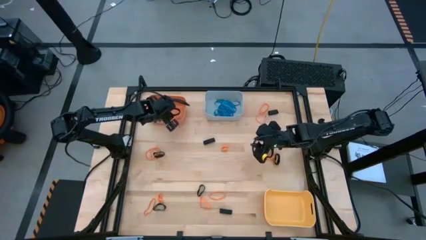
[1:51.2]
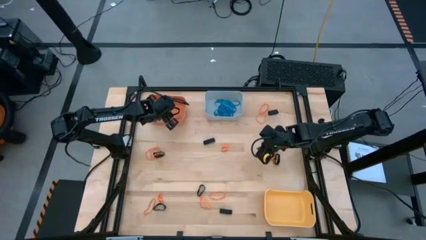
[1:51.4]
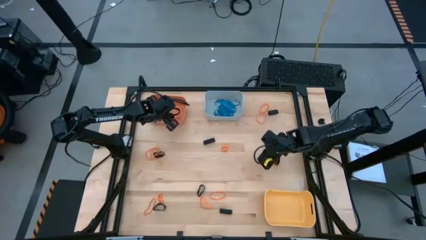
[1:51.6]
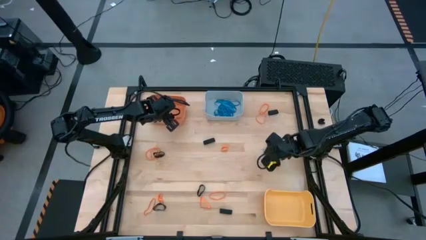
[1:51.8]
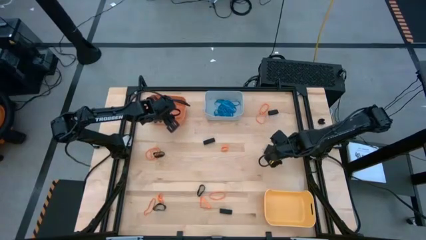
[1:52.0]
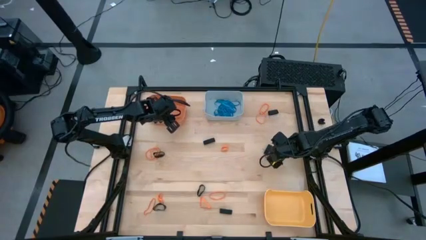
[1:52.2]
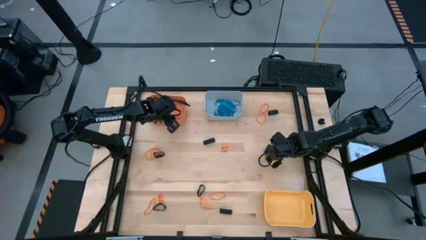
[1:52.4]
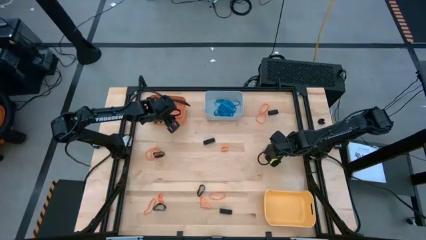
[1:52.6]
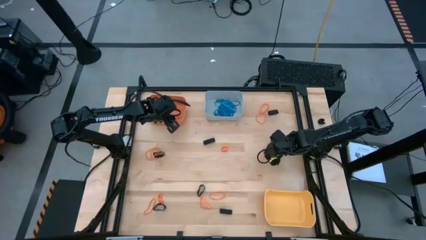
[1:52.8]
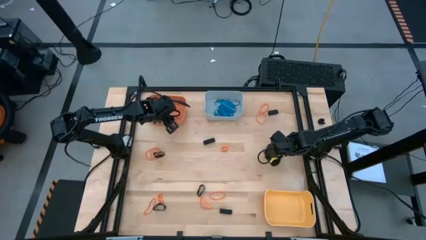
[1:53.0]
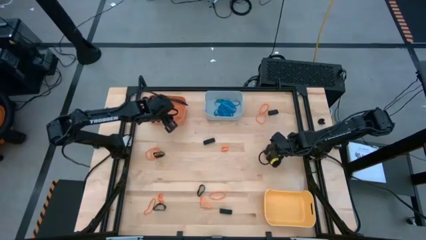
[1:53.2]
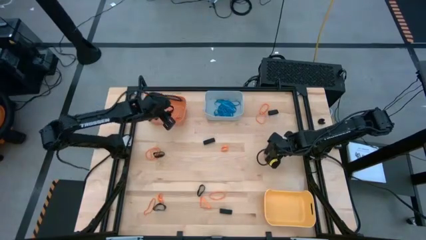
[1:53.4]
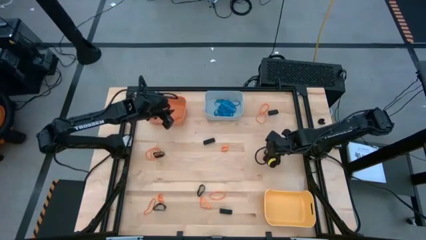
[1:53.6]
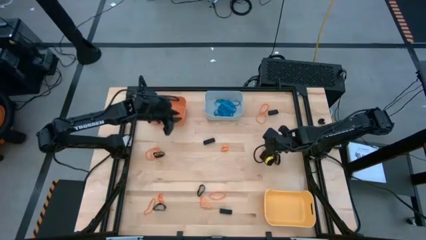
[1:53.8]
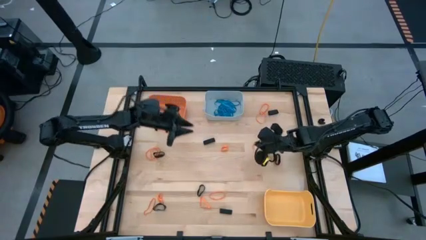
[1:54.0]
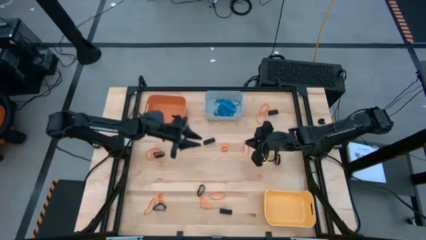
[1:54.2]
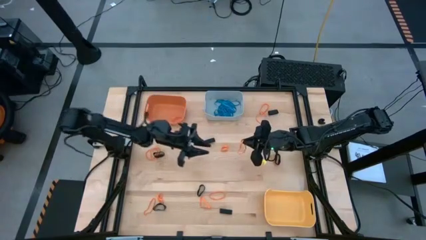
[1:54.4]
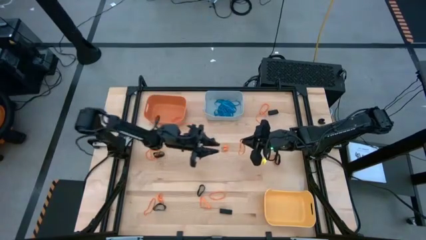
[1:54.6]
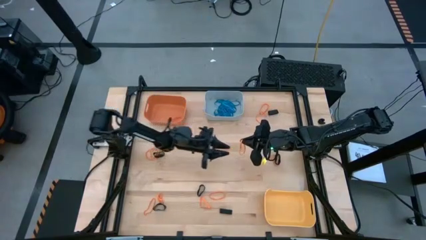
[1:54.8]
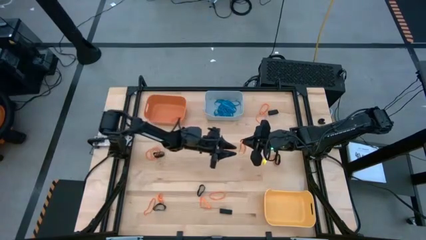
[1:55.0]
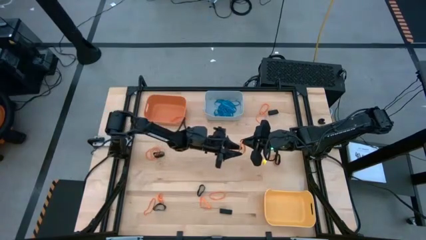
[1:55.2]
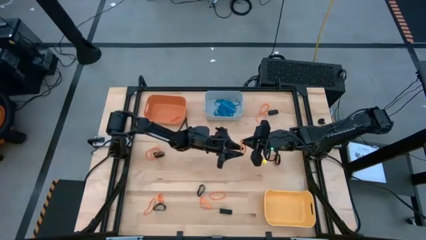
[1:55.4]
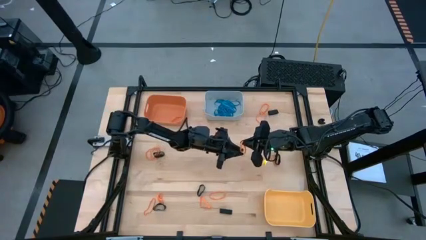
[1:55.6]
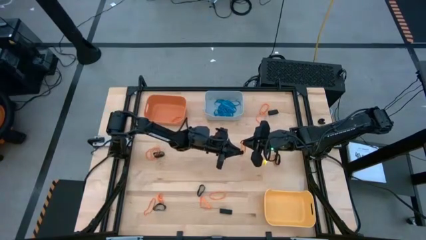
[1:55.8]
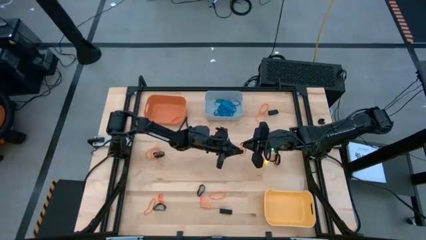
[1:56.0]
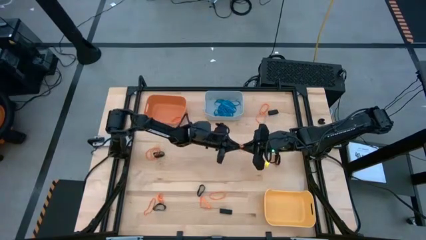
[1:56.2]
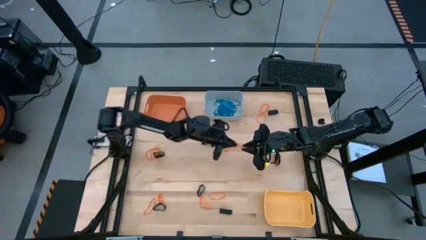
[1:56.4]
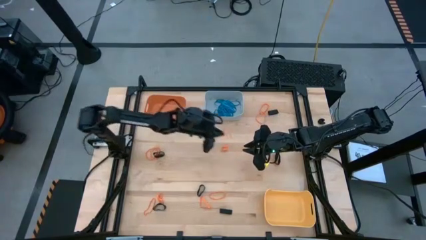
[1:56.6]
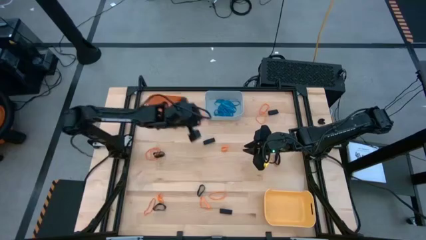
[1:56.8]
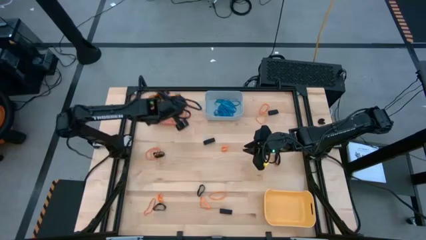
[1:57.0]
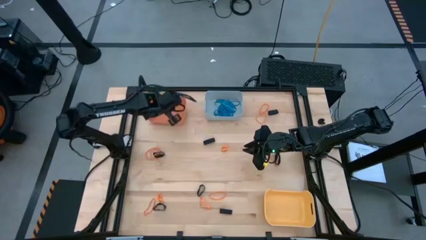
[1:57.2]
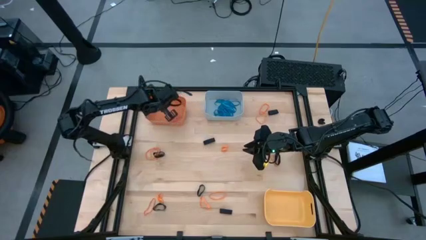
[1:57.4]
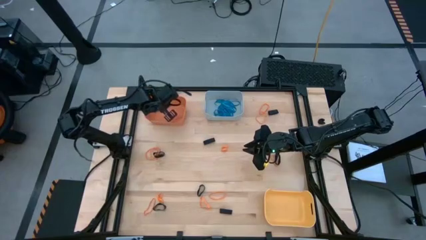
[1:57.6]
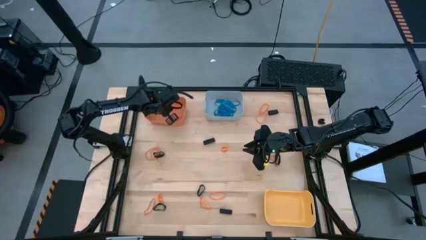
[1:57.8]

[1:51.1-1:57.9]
Task: Sort rubber bands into baskets
Put the orange rubberband into the orange bin

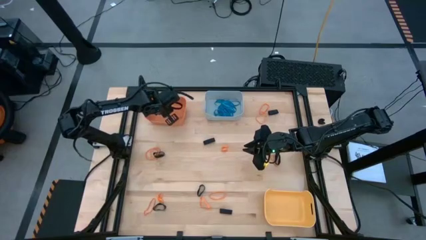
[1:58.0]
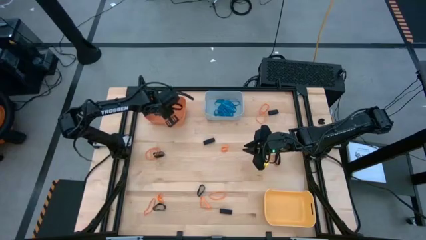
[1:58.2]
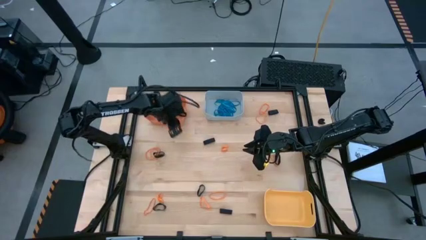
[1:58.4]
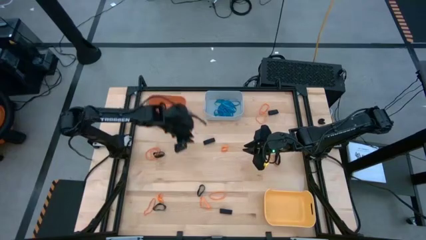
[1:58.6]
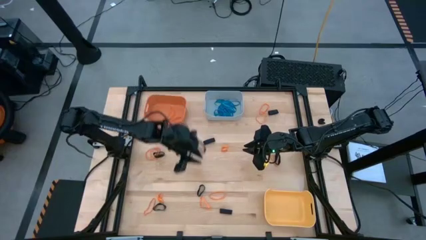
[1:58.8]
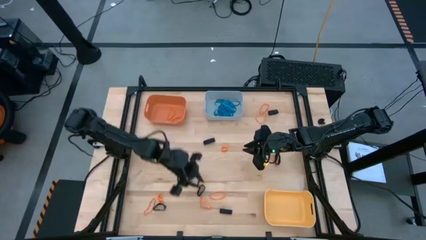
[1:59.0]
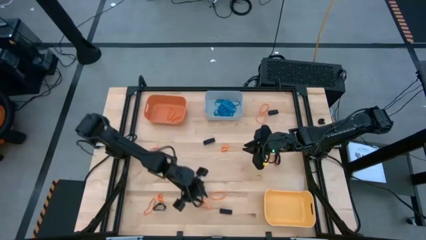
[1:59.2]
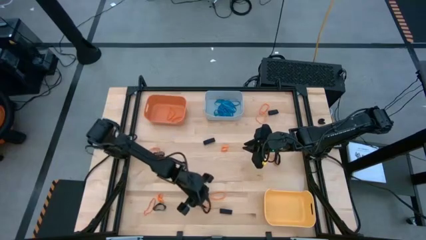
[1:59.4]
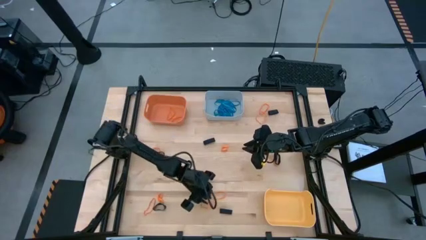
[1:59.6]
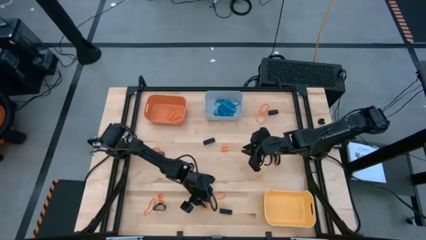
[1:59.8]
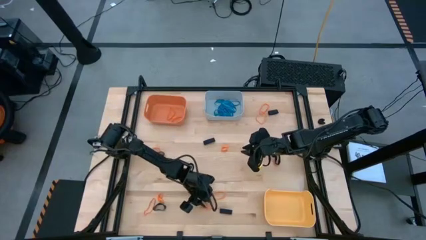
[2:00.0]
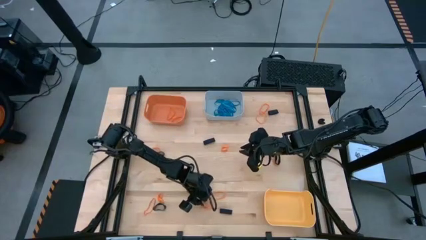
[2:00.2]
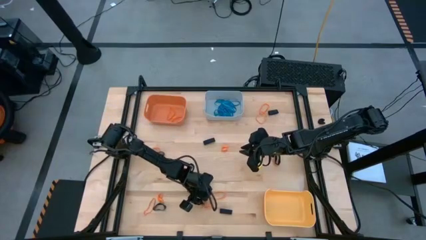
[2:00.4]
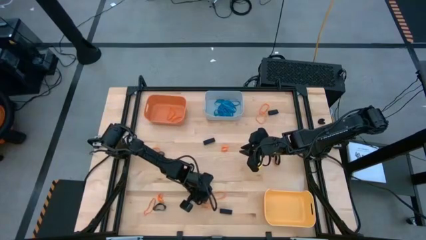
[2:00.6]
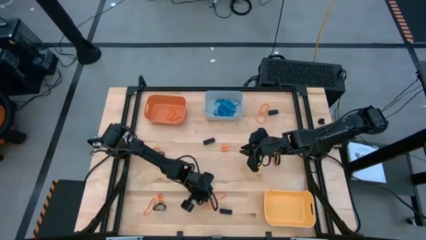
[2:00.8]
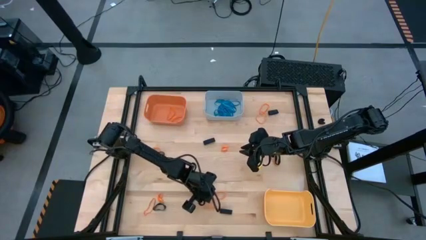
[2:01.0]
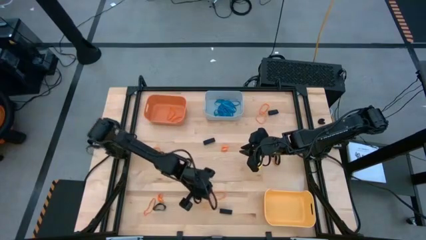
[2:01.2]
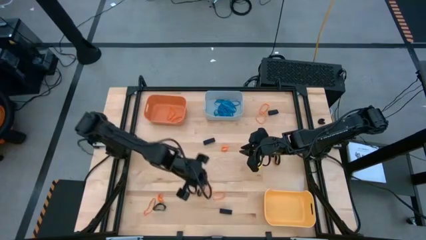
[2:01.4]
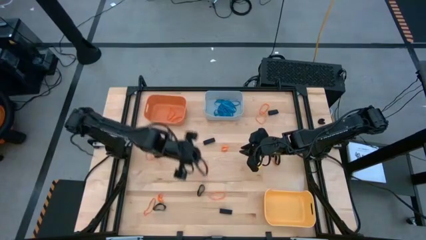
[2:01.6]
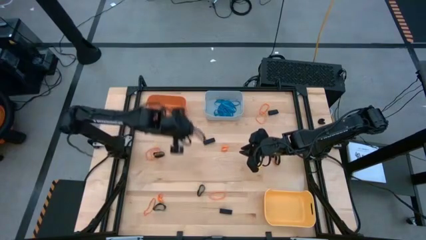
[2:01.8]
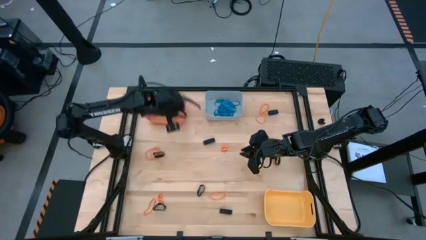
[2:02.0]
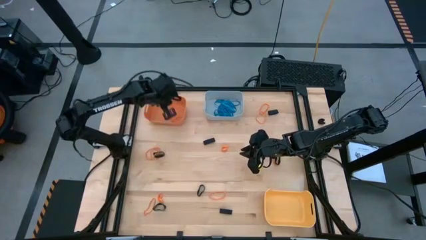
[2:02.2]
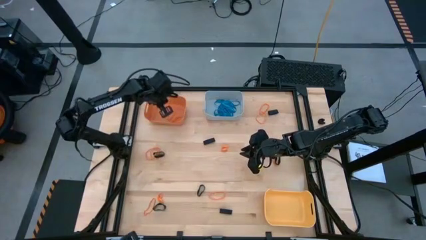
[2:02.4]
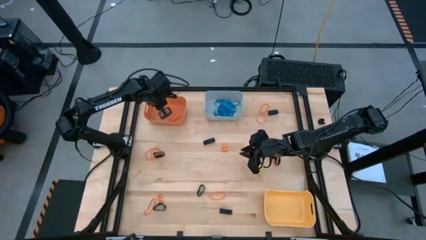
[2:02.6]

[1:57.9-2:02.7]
Put the orange rubberband into the orange bin

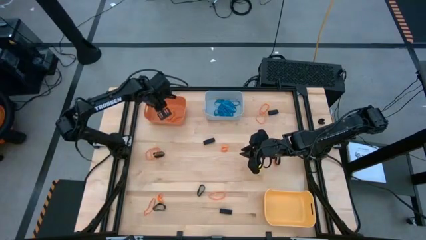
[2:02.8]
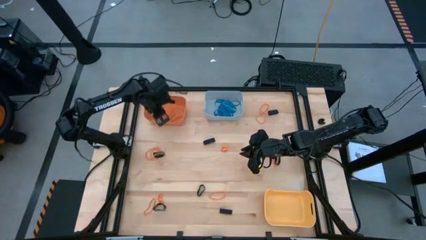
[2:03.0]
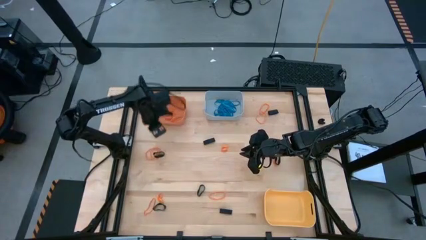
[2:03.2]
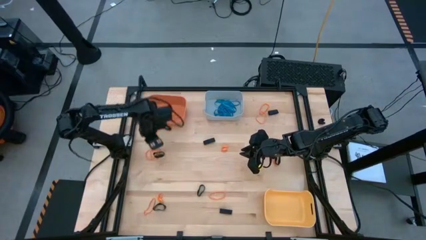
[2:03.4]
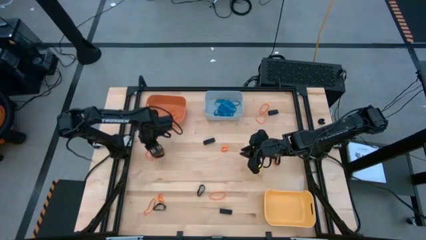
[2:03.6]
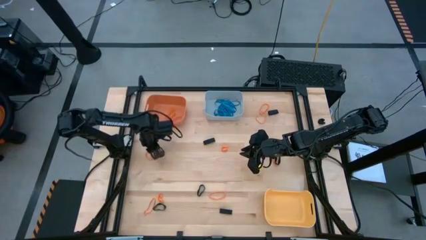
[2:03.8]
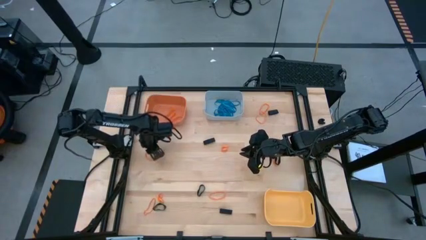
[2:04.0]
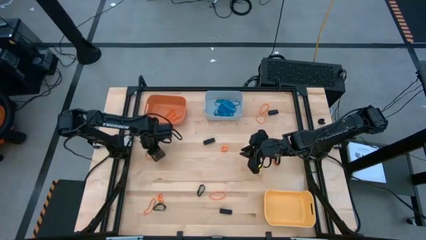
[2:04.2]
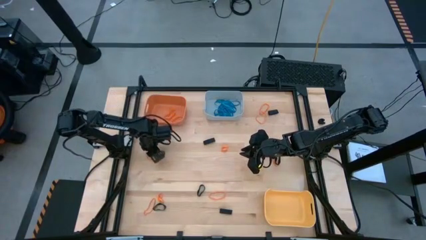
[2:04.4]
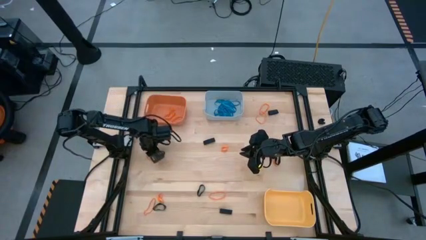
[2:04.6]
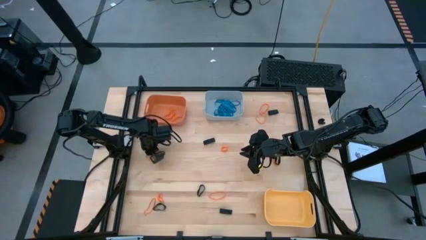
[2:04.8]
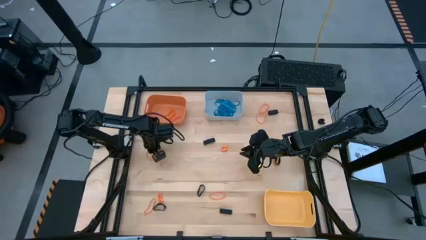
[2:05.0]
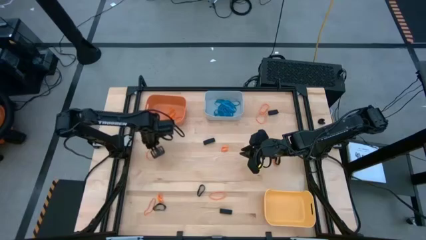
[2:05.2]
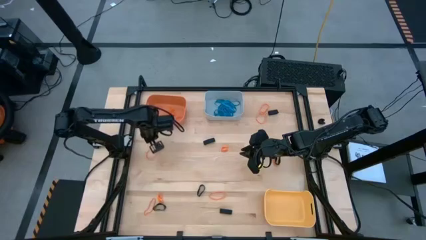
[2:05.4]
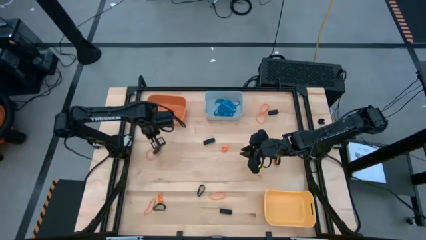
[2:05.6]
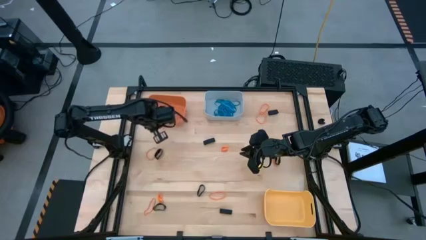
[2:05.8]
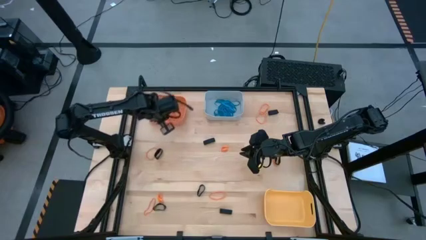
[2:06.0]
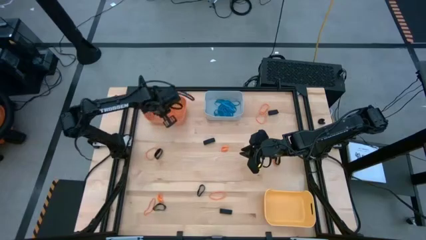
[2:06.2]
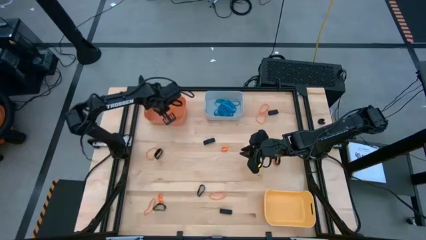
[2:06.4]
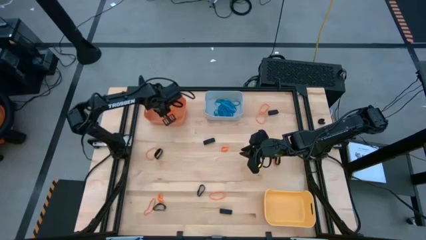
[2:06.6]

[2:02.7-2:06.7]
Put the orange rubberband into the orange bin
